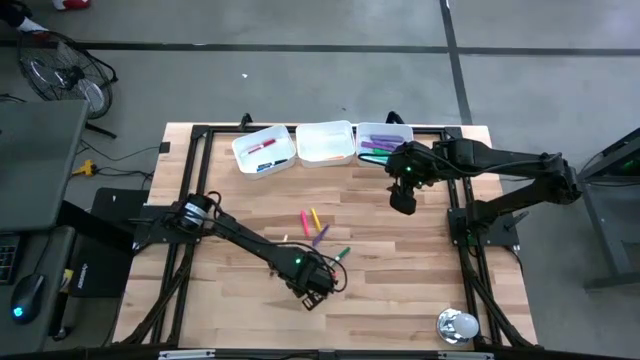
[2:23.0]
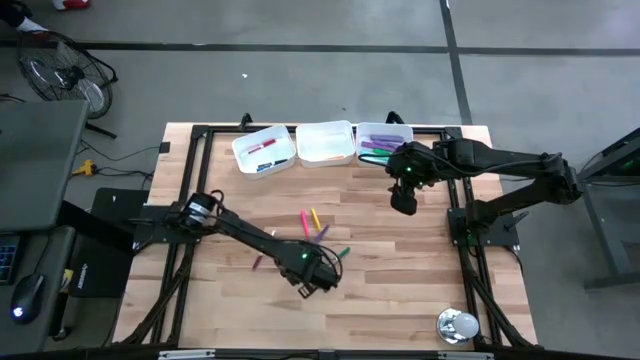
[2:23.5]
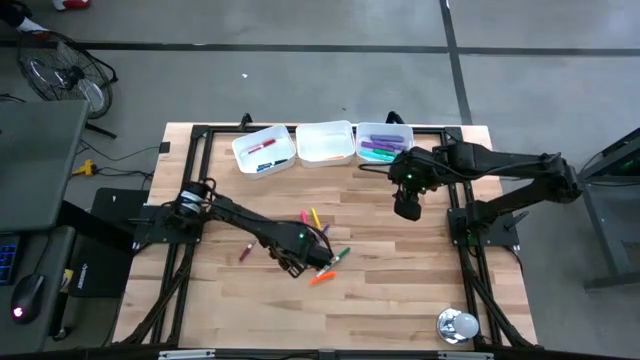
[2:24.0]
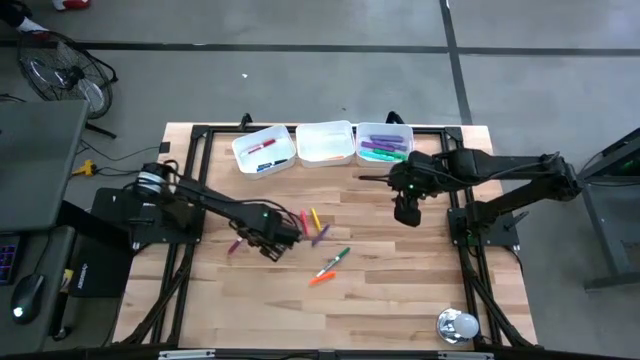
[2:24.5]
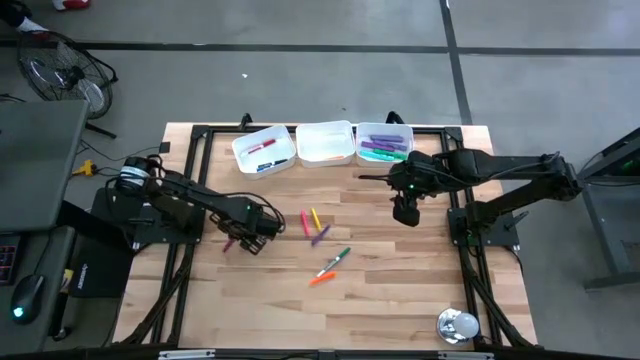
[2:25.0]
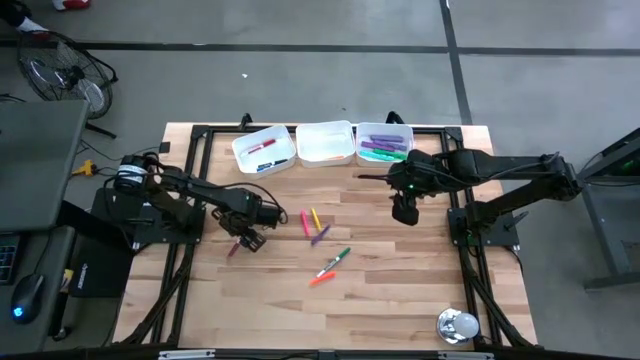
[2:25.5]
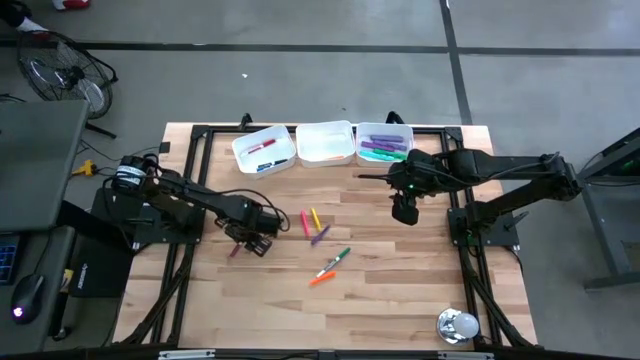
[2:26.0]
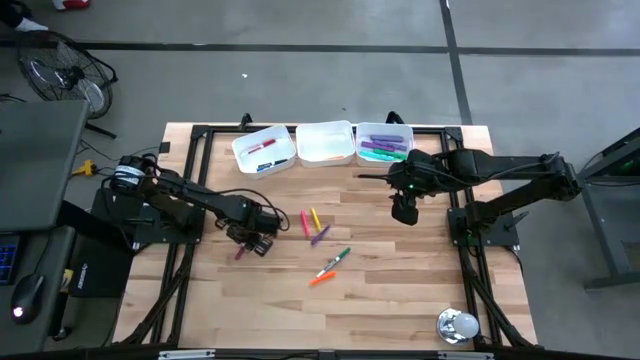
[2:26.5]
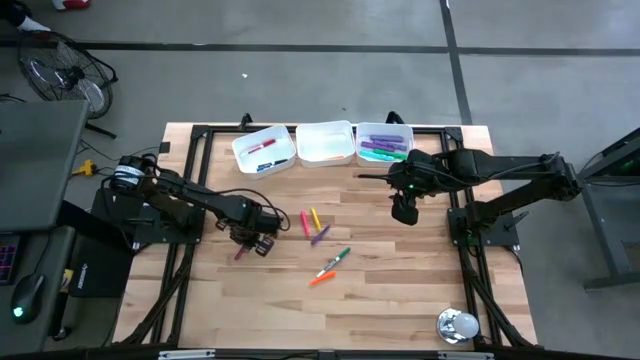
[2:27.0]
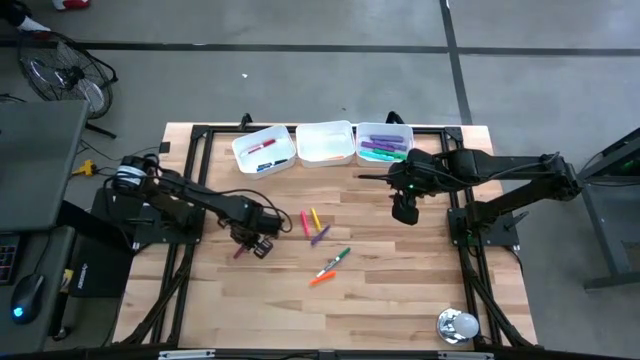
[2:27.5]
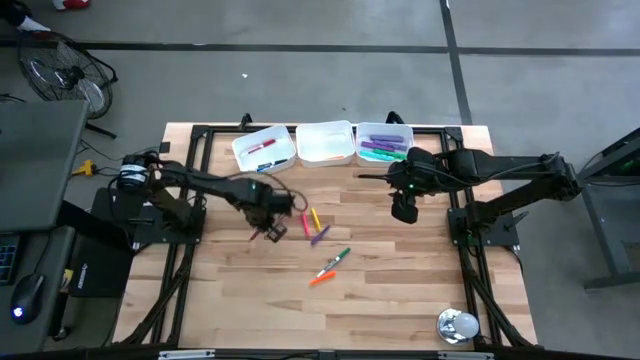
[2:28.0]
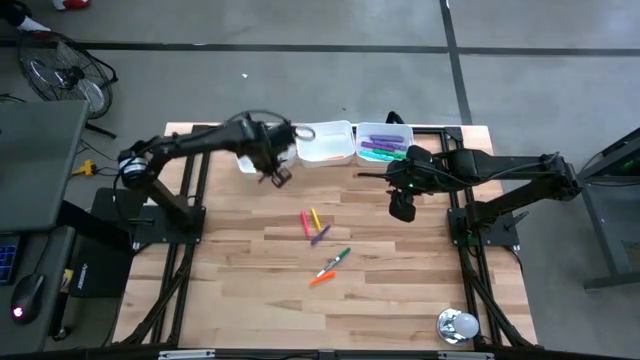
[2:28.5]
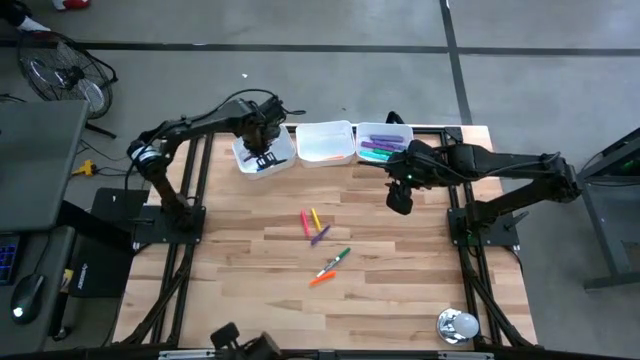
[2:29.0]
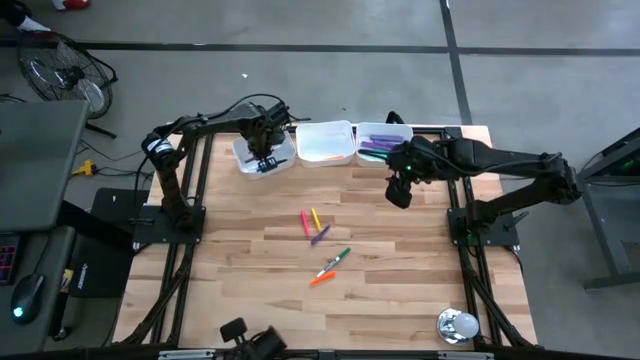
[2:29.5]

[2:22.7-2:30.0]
Task: Pick & Place Markers
Put the pink marker pen into the left white bin

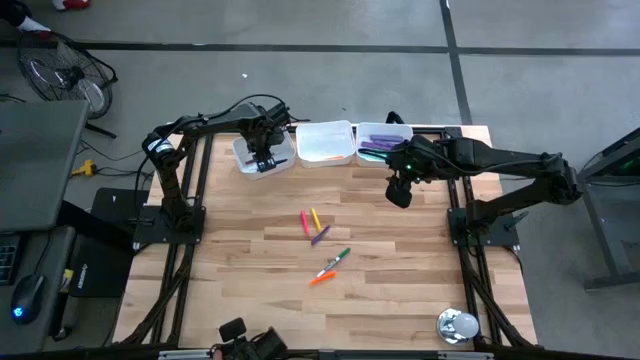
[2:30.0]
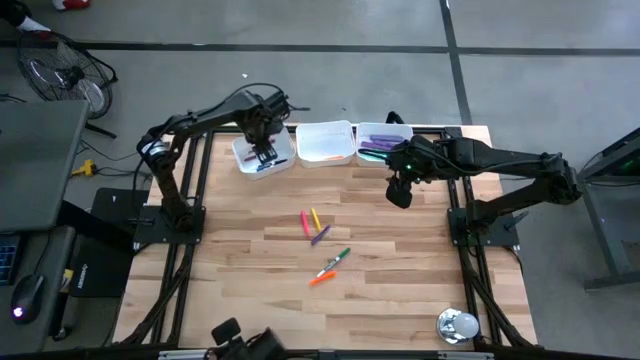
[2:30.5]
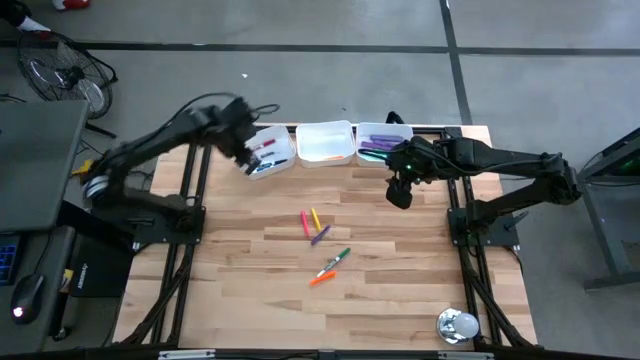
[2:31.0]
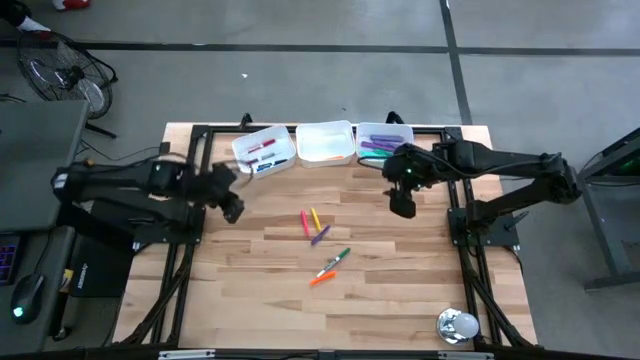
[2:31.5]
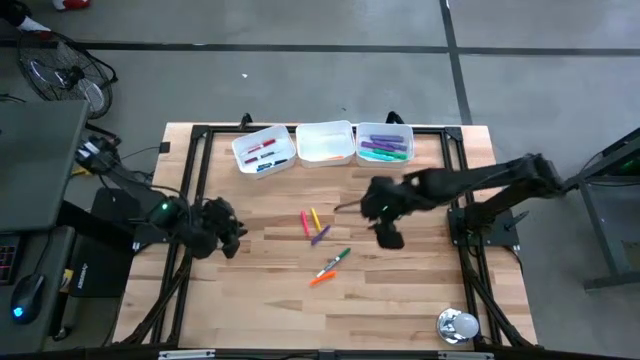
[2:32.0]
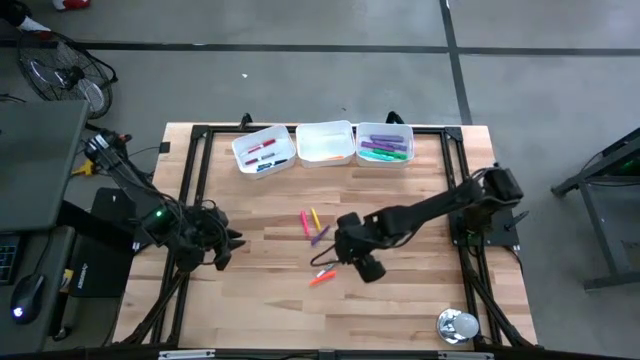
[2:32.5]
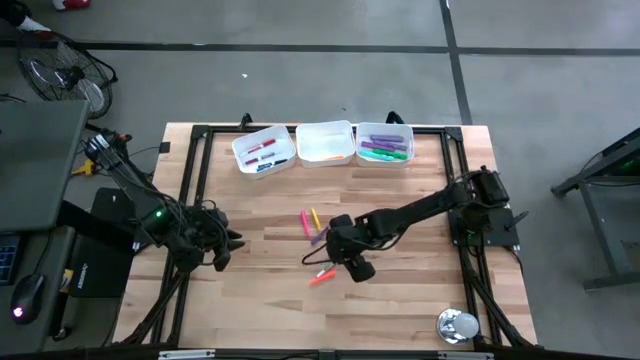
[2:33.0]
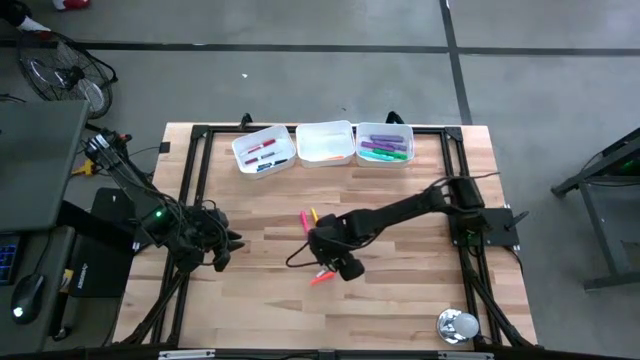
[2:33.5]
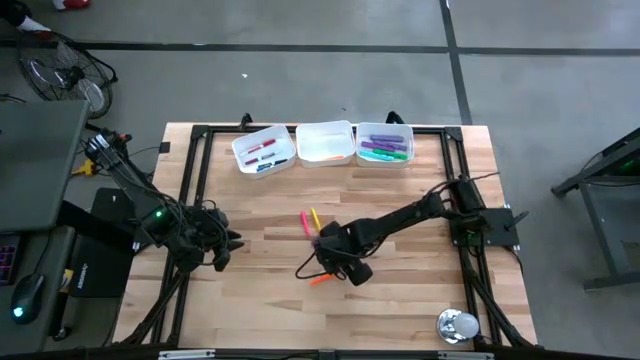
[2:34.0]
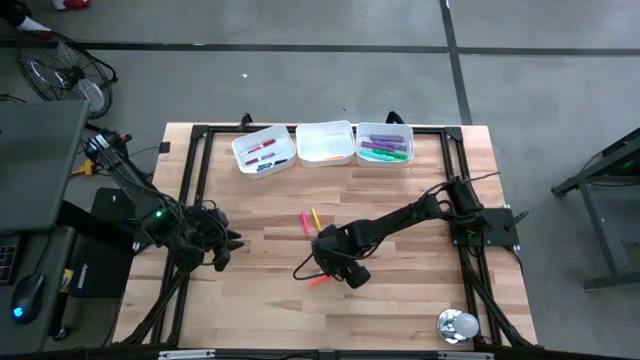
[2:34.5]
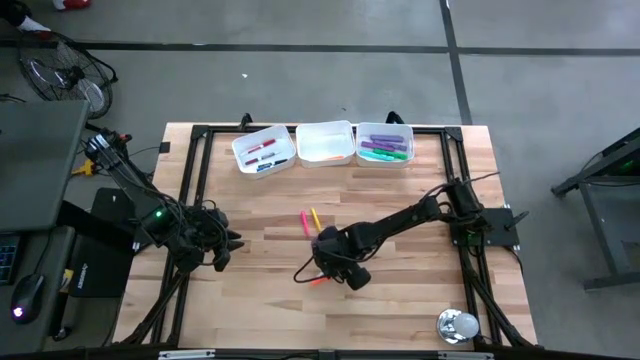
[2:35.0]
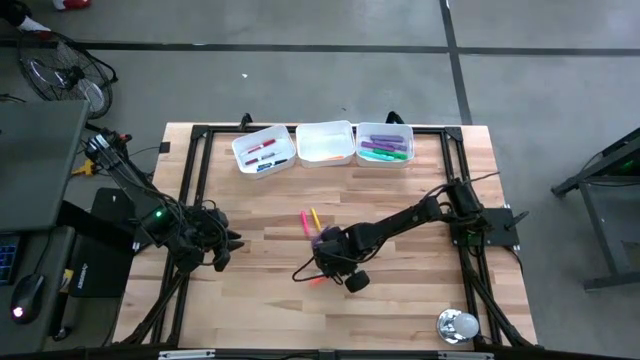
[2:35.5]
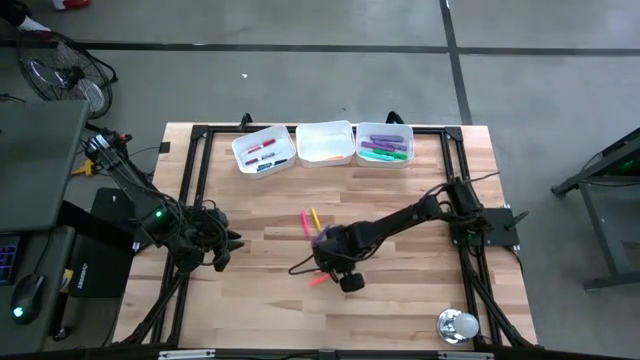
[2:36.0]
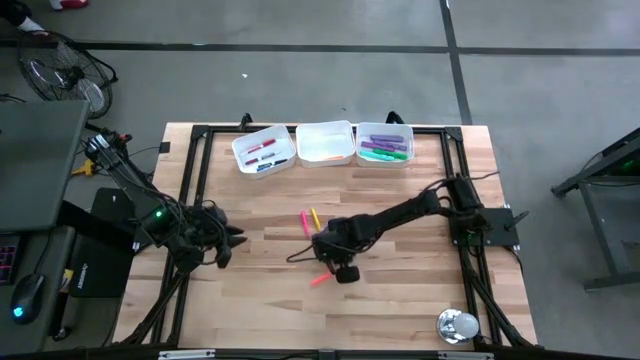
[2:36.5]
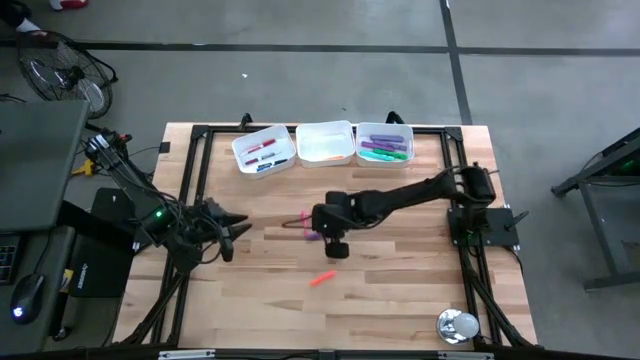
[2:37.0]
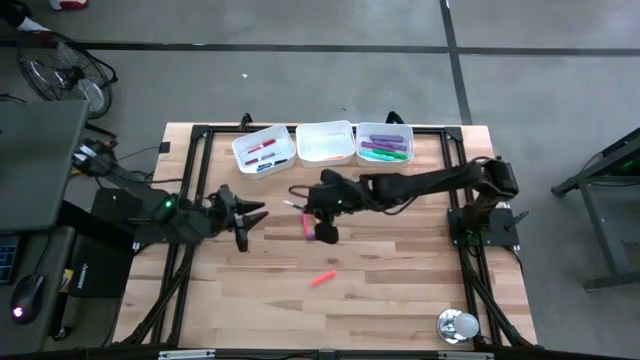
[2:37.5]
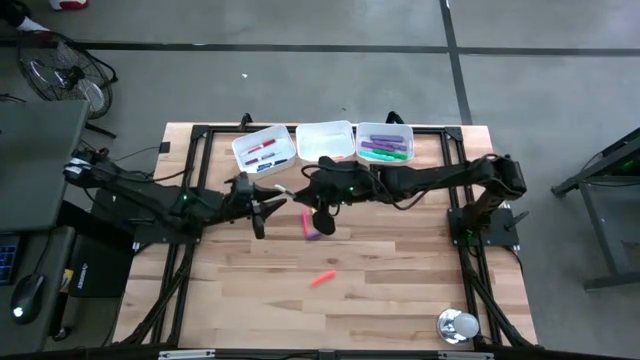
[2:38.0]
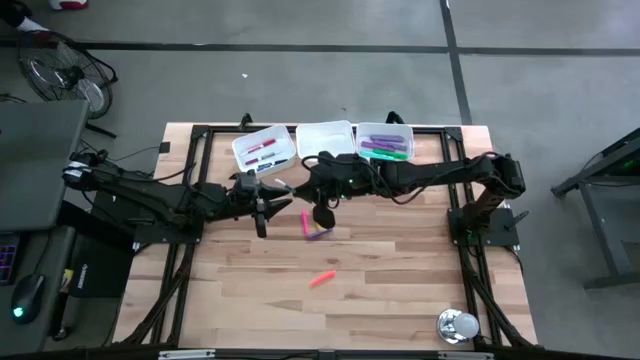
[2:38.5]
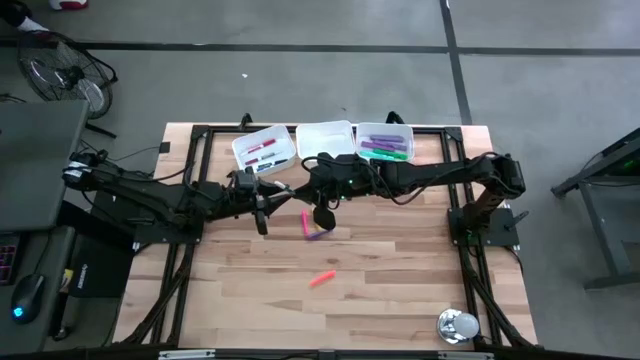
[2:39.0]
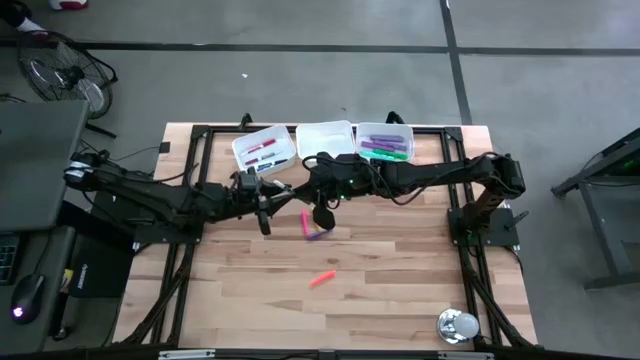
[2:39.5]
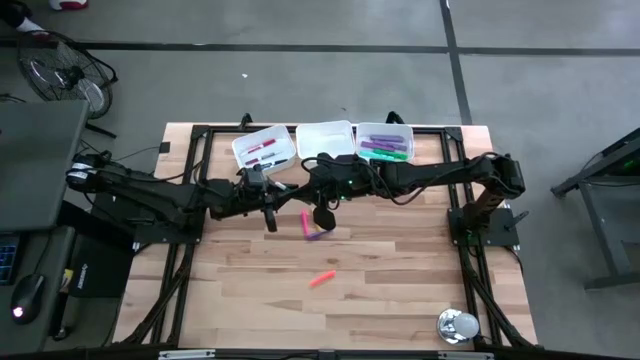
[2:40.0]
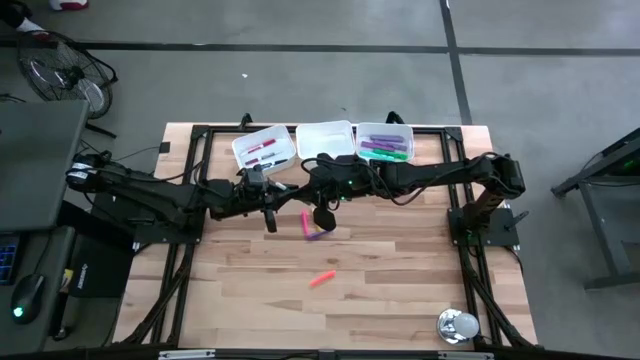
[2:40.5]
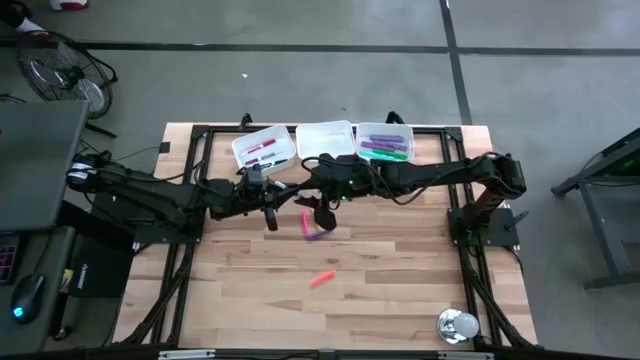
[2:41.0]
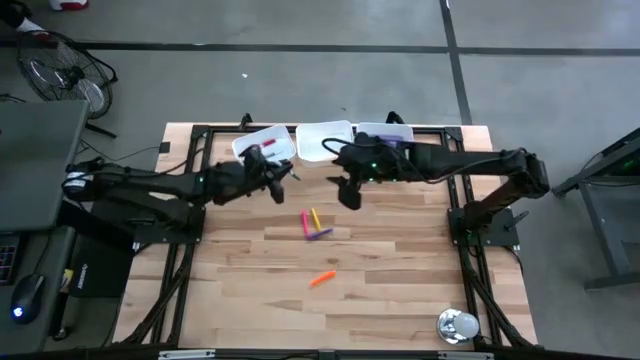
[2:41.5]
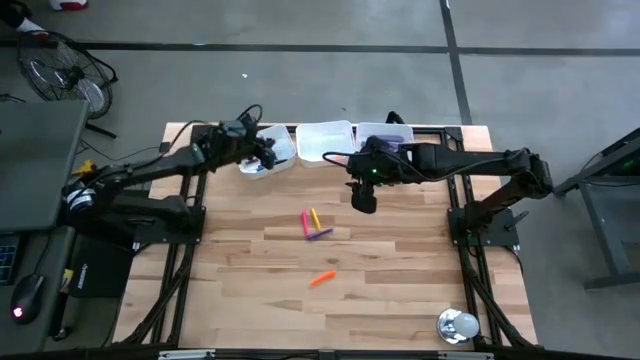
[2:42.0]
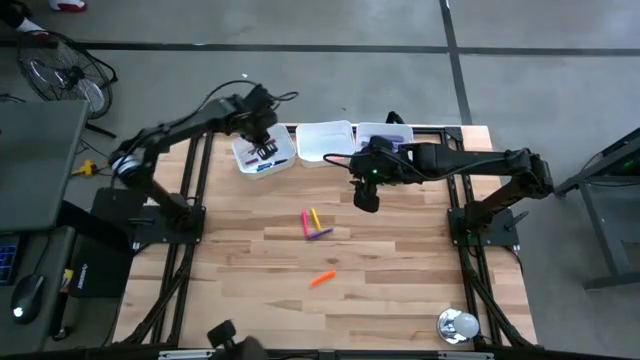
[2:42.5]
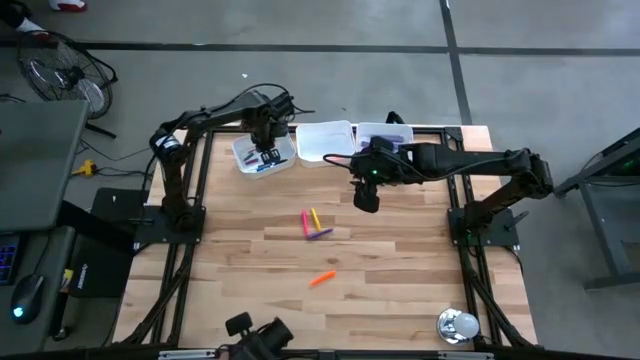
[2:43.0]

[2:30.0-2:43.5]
Put the green marker pen into the left white bin

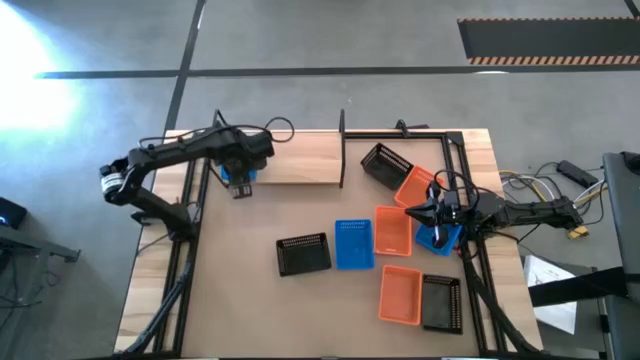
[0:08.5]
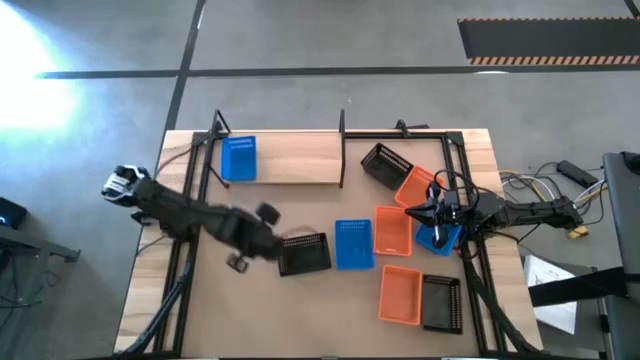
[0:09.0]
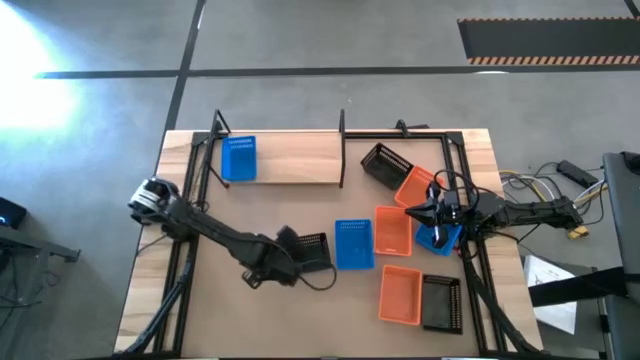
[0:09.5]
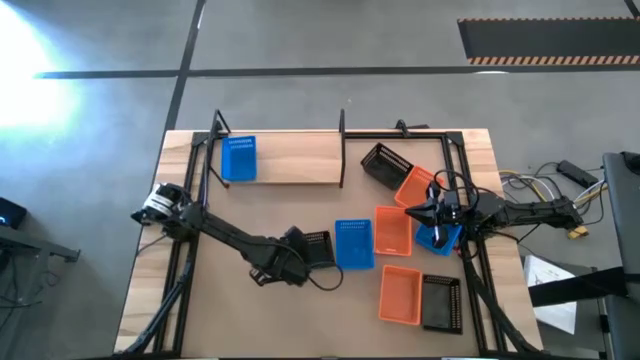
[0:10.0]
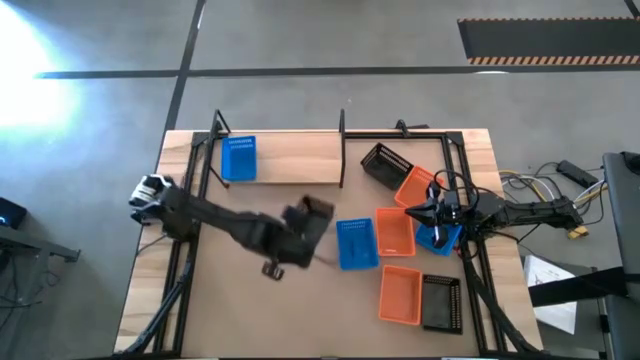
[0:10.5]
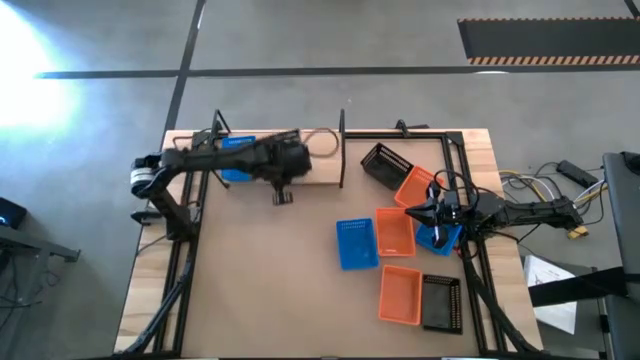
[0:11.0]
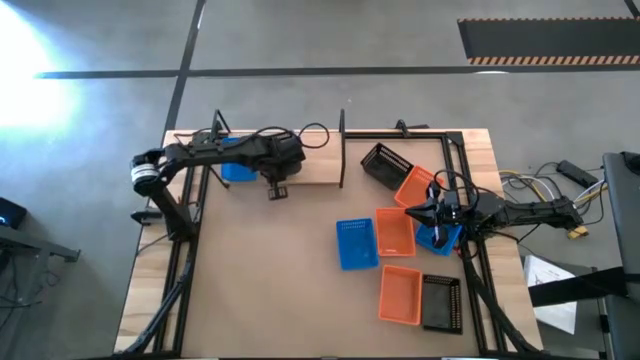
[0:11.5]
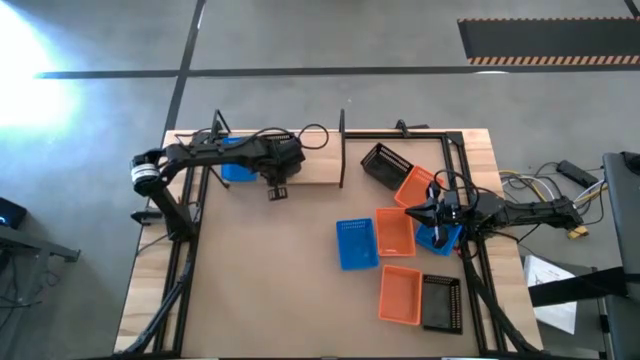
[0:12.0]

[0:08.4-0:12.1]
Task: Stack baskets on shelf by color
Put the left black basket on the shelf
